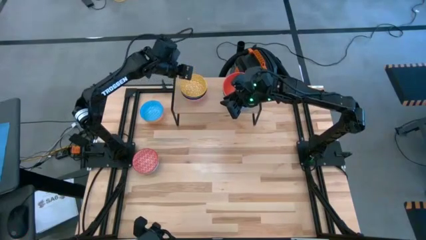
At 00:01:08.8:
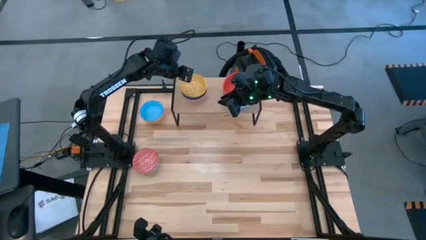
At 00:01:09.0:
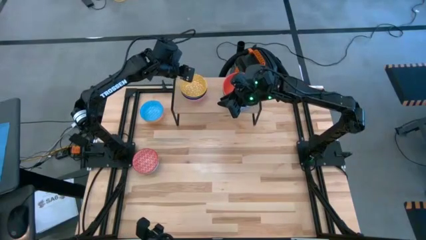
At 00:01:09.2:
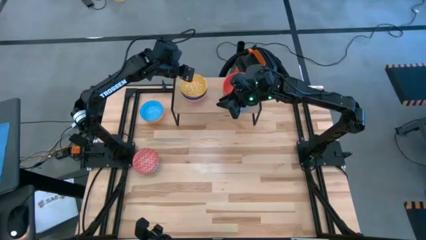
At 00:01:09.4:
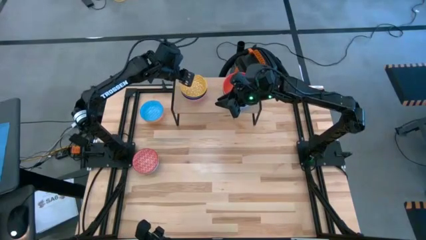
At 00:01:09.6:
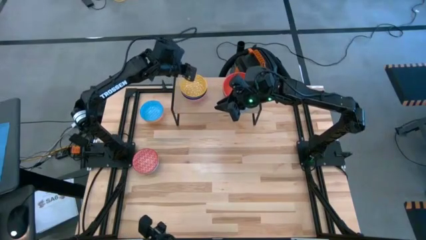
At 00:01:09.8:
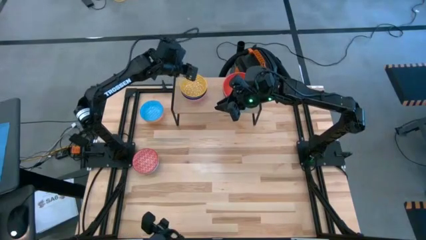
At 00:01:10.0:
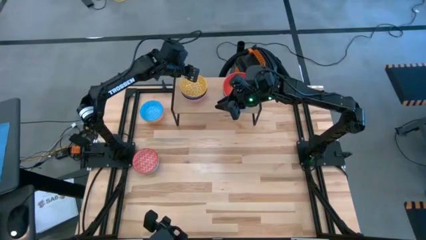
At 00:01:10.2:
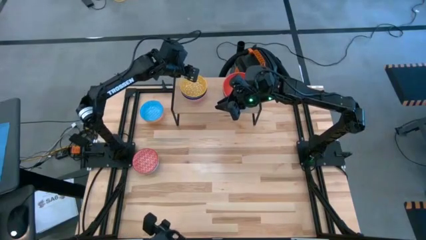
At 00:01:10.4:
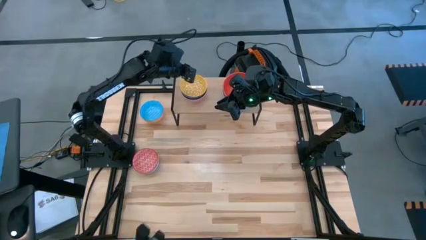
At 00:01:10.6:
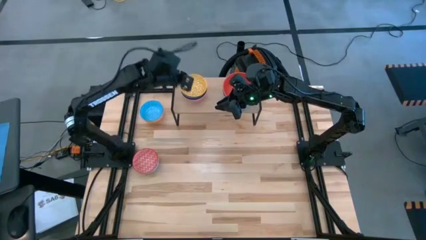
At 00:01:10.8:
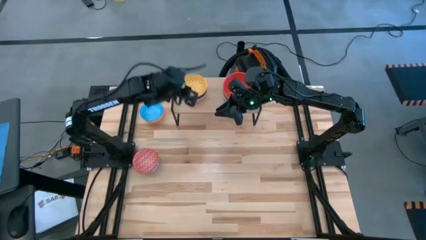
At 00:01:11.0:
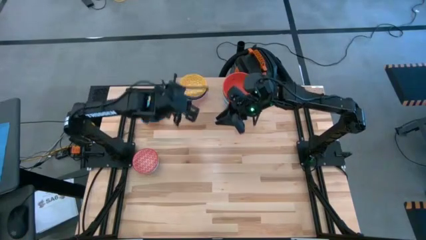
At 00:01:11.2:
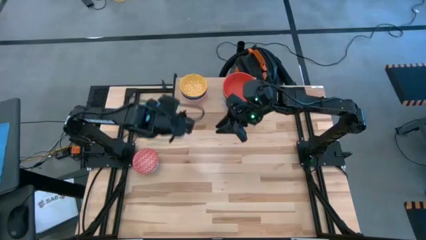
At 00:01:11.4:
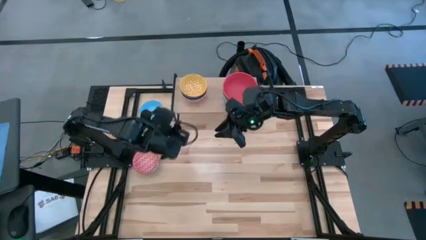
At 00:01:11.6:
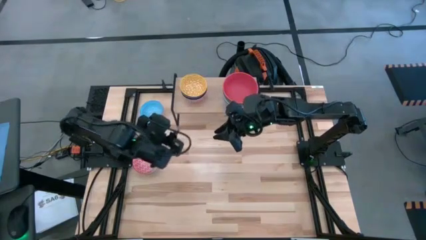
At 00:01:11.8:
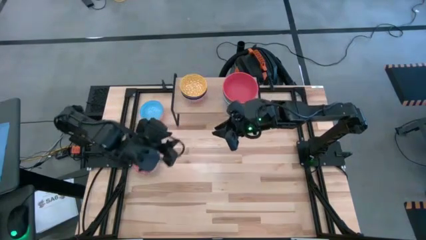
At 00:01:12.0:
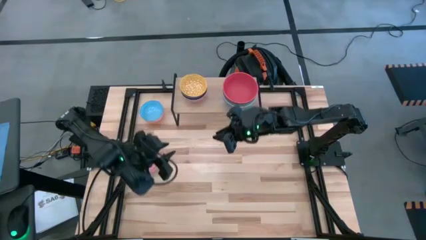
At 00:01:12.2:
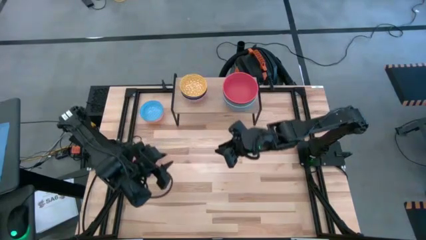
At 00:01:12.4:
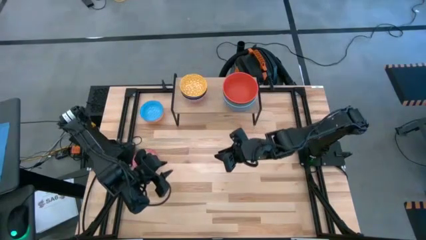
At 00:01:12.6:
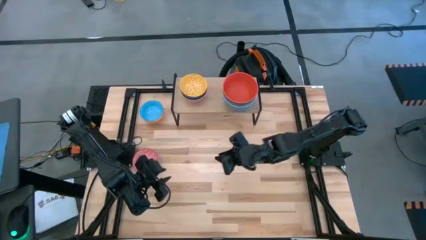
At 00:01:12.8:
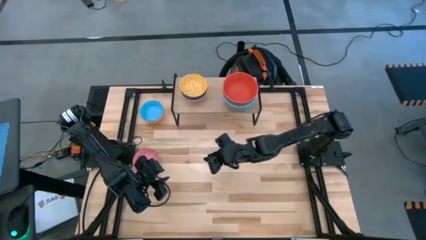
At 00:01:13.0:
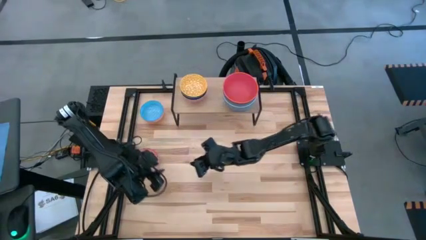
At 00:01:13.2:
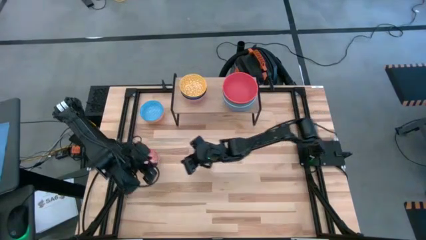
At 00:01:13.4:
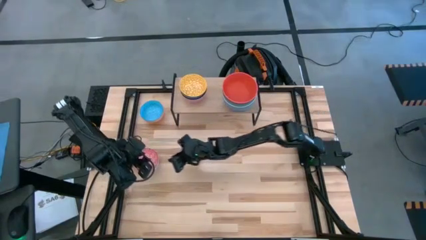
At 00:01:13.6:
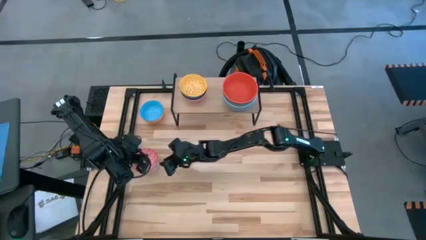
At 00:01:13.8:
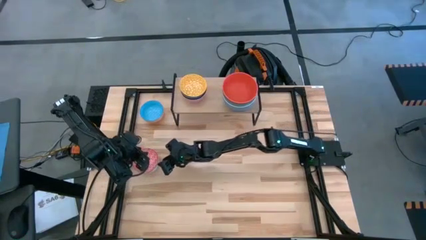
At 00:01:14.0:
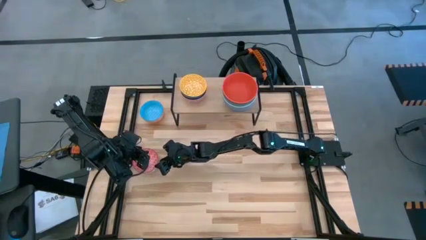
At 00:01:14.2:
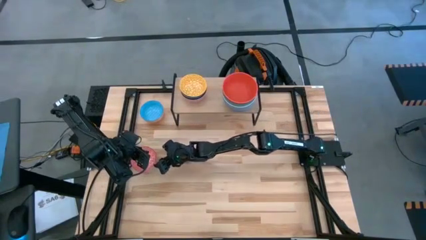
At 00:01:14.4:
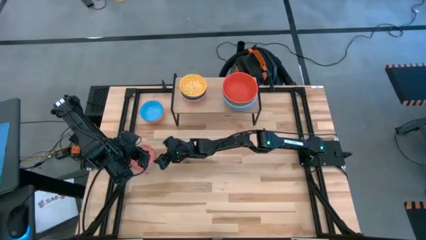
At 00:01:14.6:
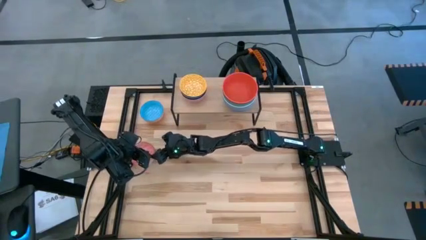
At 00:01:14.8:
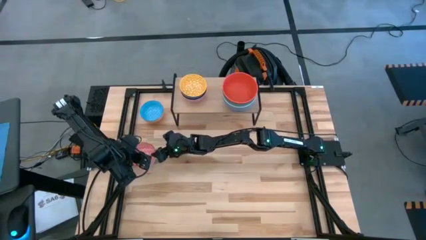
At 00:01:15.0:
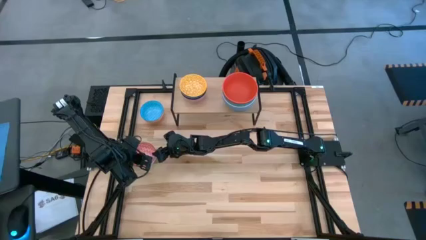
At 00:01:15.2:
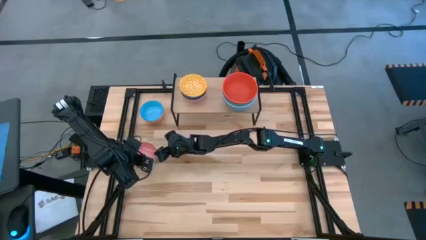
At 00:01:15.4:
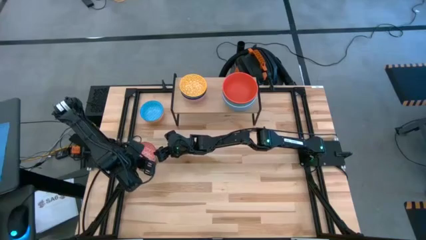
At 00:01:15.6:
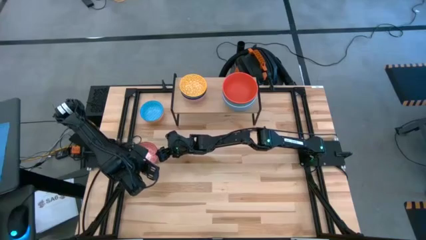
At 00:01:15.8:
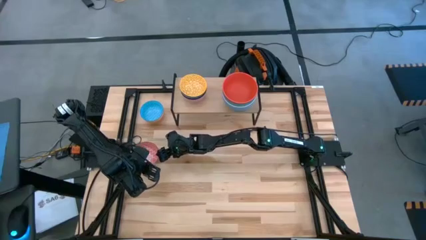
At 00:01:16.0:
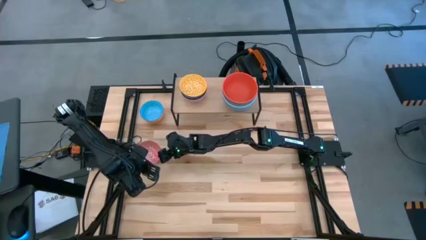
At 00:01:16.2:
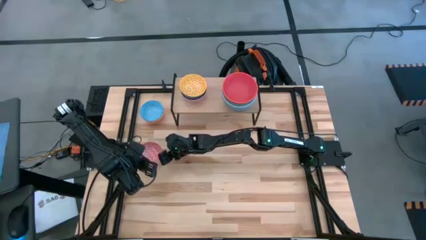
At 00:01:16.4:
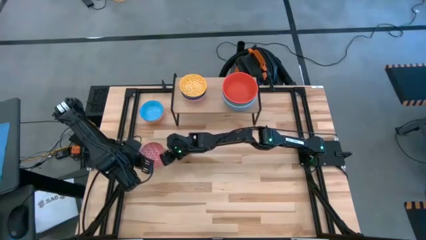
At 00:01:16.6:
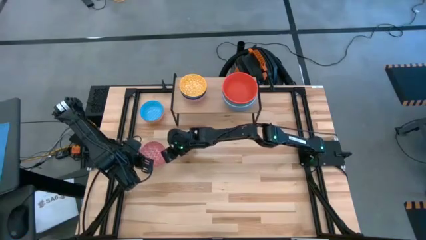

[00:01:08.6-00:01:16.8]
Task: Place and stack bowls onto a shelf
Stack the patterned red bowl on top of the patterned yellow bowl on the shelf

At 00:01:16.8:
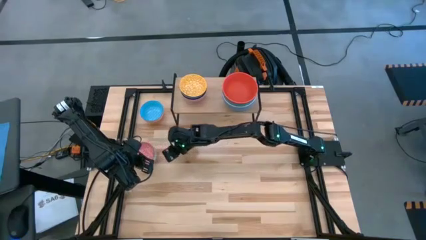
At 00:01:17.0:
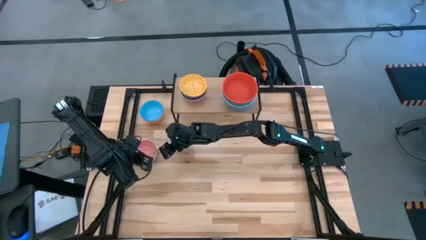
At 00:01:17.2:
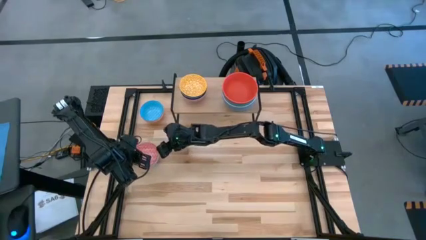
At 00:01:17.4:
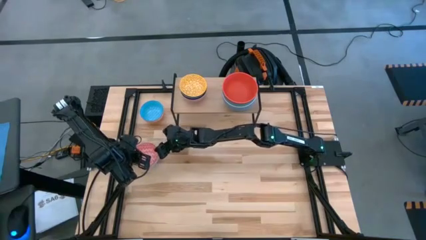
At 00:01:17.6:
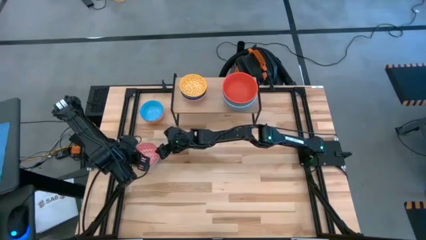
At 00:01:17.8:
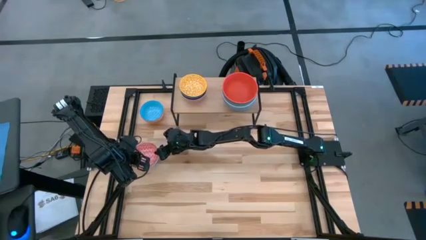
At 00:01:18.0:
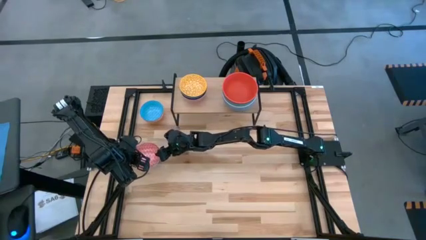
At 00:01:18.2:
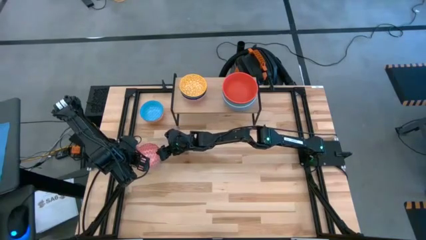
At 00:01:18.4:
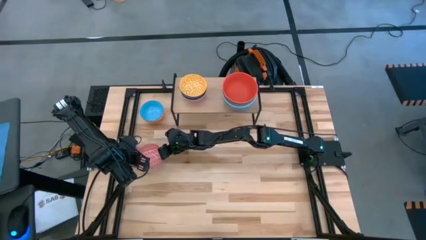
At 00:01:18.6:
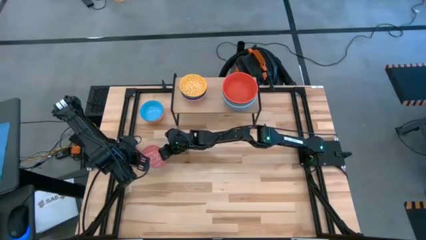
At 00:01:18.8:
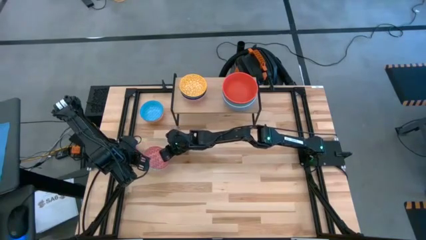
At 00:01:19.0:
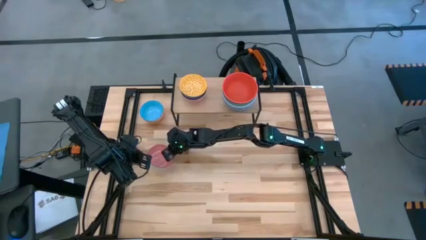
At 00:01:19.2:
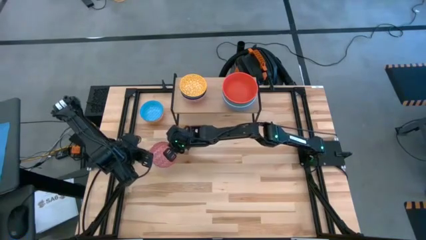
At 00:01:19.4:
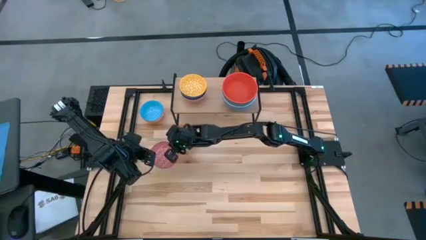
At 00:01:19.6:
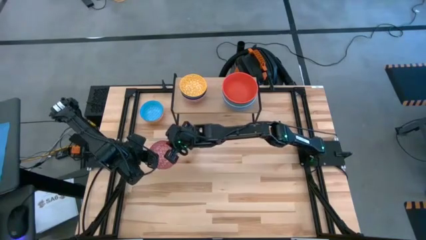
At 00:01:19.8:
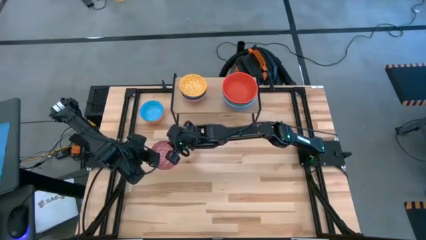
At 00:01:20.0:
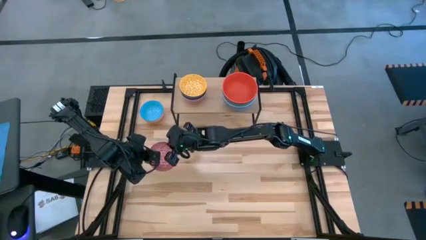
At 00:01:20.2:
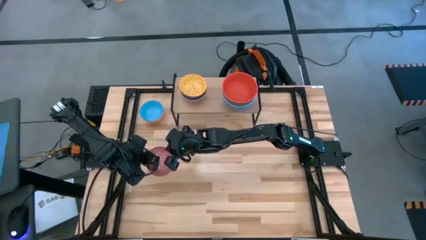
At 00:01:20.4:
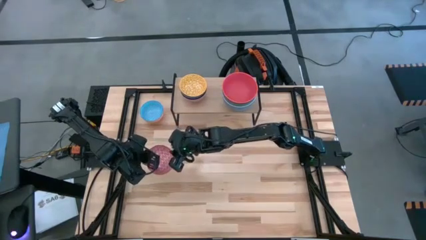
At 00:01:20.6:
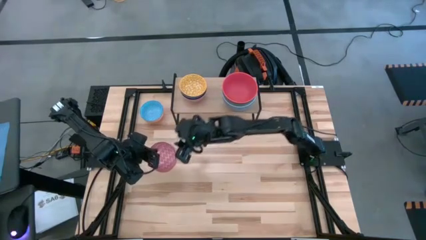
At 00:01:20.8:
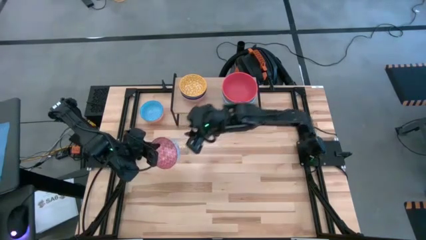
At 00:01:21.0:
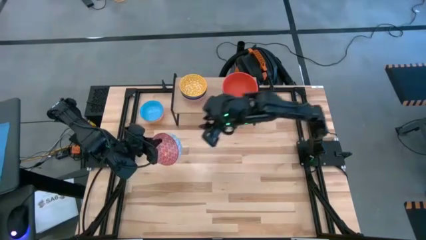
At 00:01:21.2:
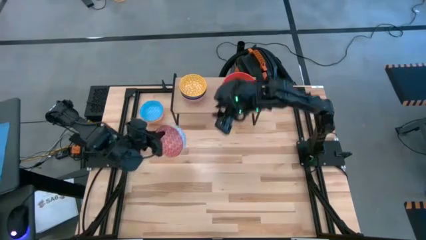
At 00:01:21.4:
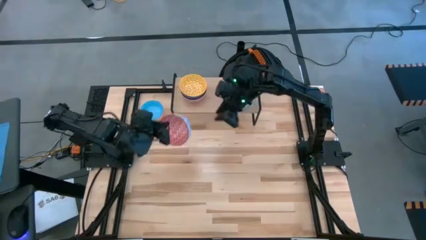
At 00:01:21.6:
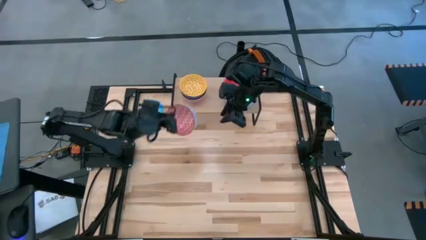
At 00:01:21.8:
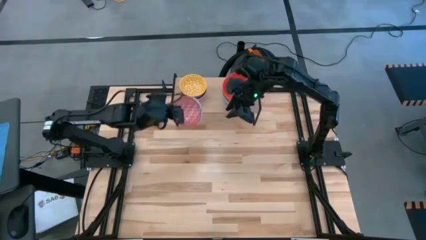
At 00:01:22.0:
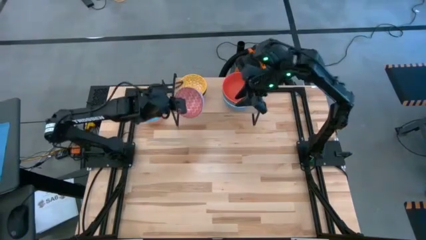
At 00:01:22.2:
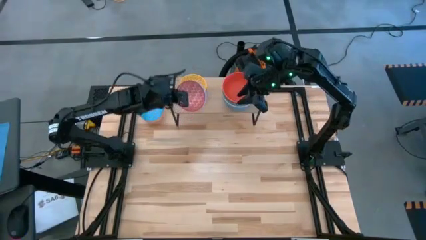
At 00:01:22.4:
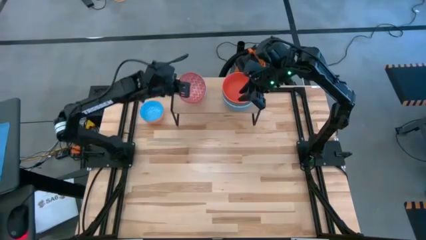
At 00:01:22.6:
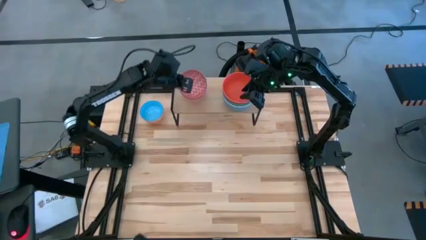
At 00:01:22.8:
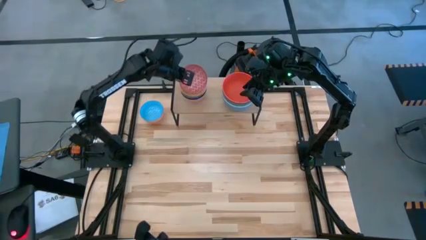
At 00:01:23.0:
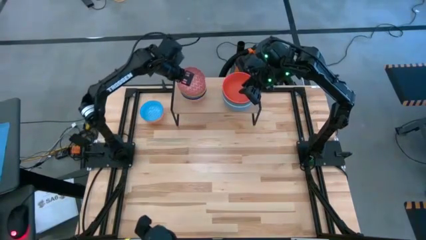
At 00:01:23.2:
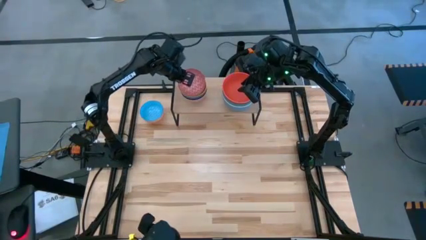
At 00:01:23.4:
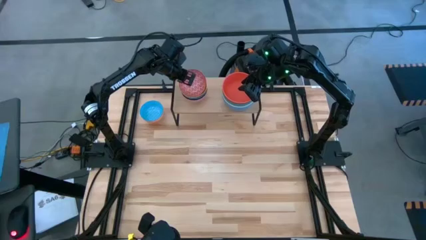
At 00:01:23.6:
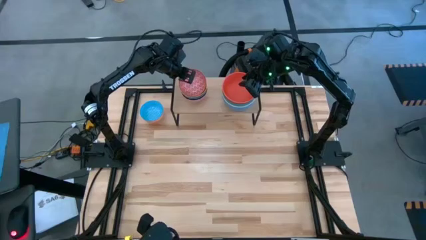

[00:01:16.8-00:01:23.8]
Stack the patterned red bowl on top of the patterned yellow bowl on the shelf
